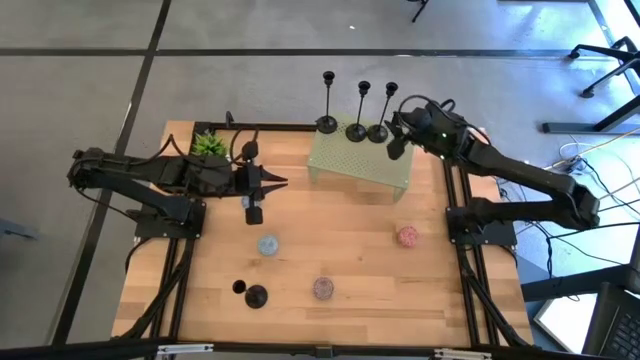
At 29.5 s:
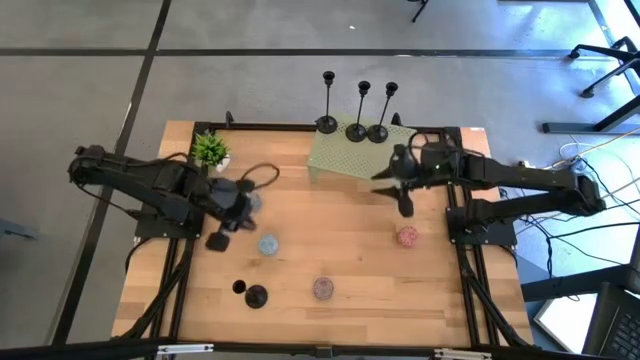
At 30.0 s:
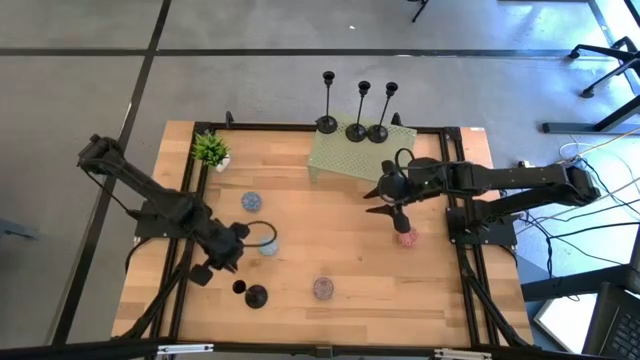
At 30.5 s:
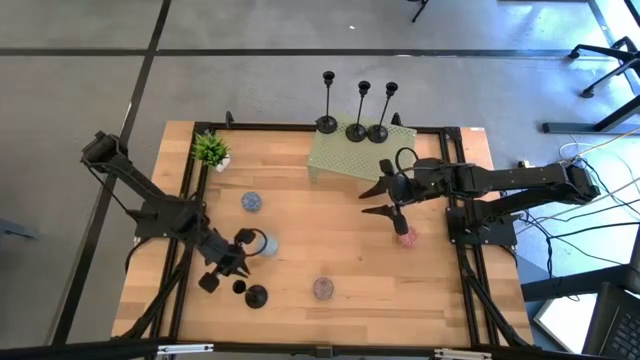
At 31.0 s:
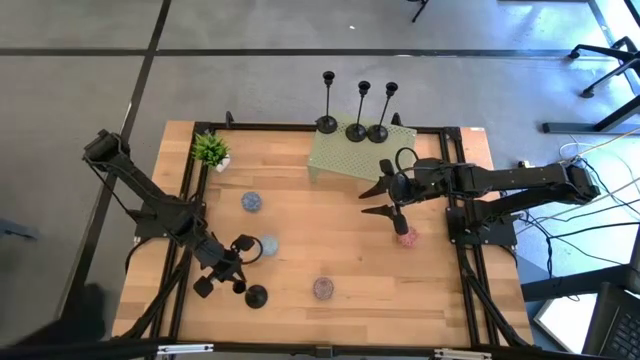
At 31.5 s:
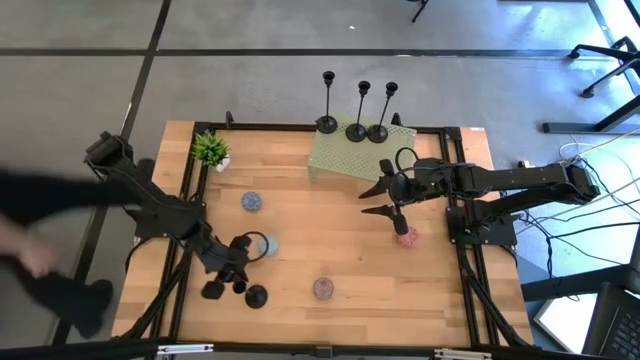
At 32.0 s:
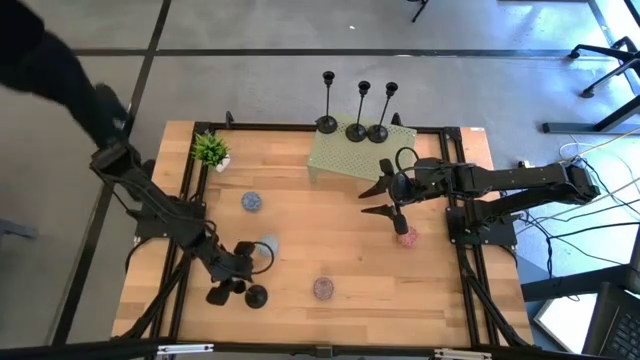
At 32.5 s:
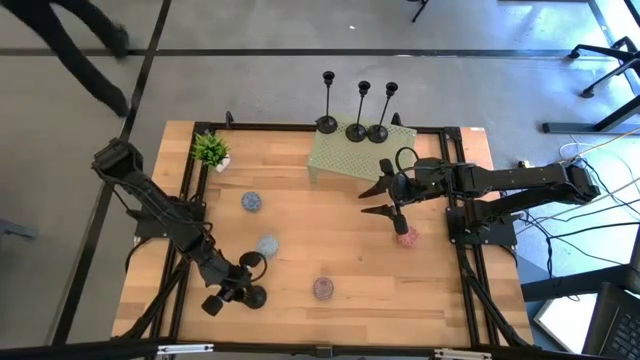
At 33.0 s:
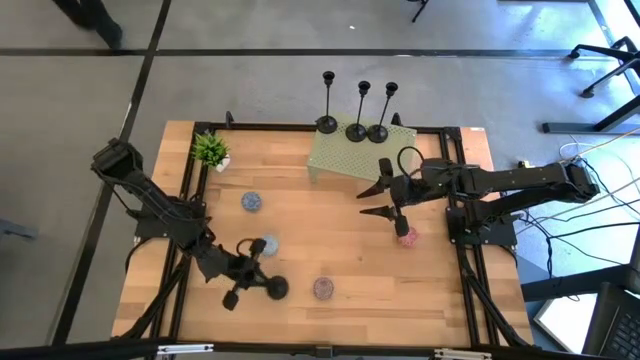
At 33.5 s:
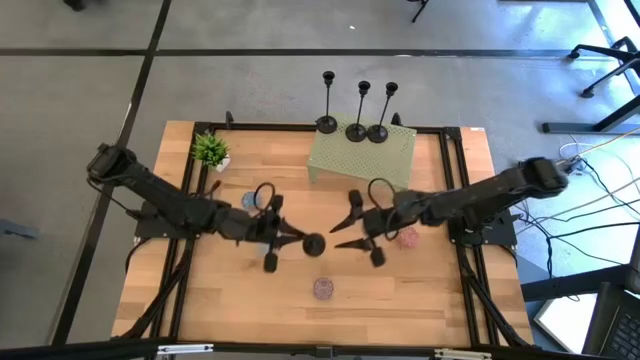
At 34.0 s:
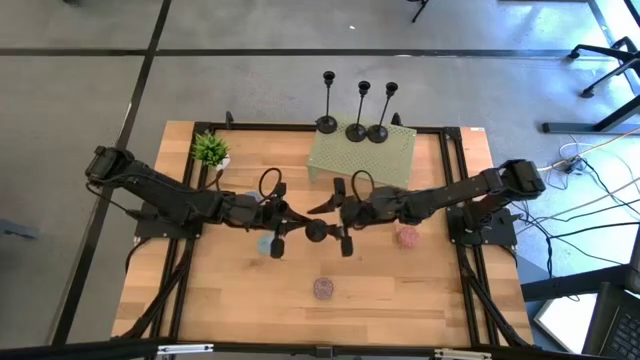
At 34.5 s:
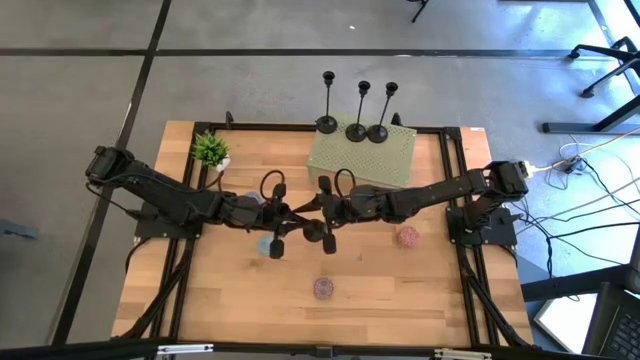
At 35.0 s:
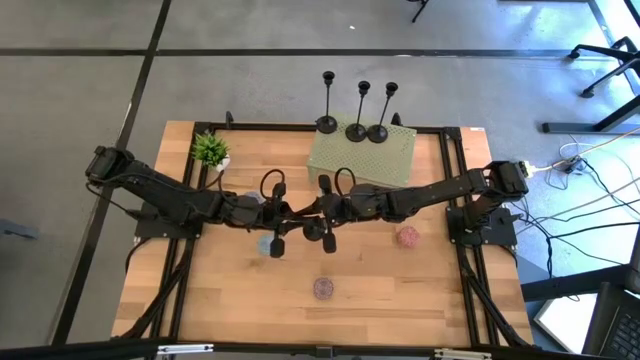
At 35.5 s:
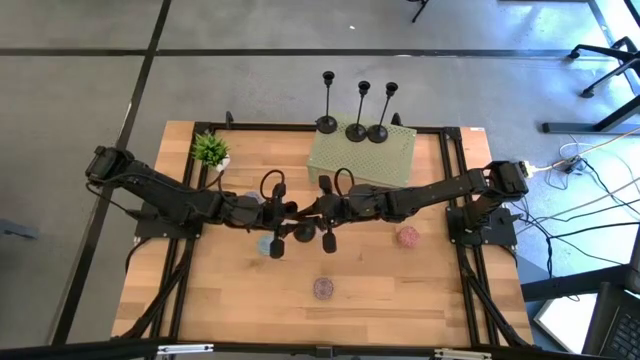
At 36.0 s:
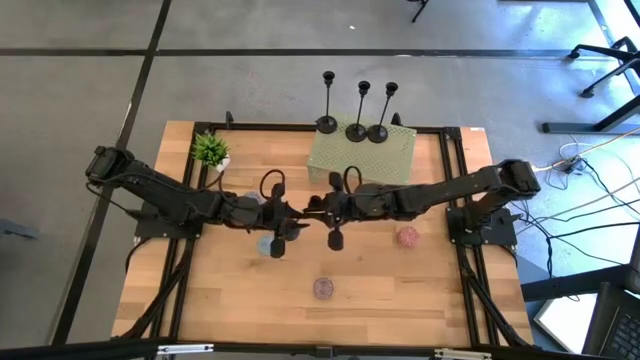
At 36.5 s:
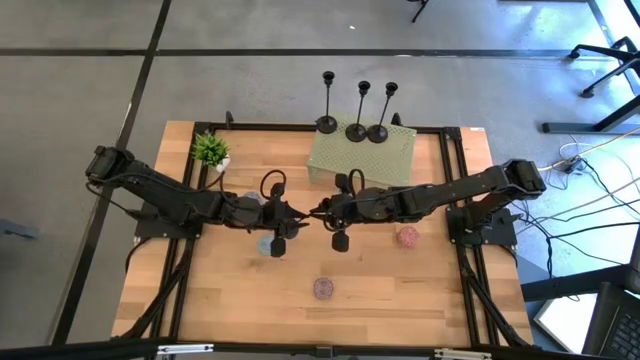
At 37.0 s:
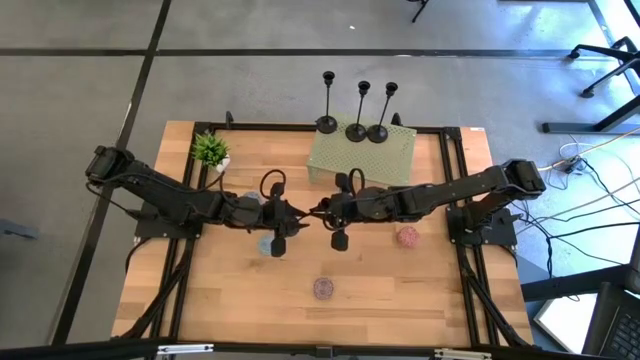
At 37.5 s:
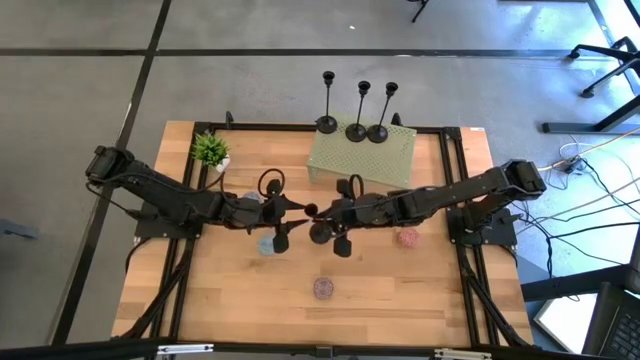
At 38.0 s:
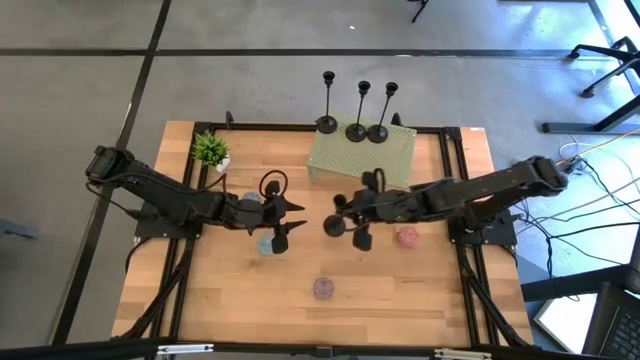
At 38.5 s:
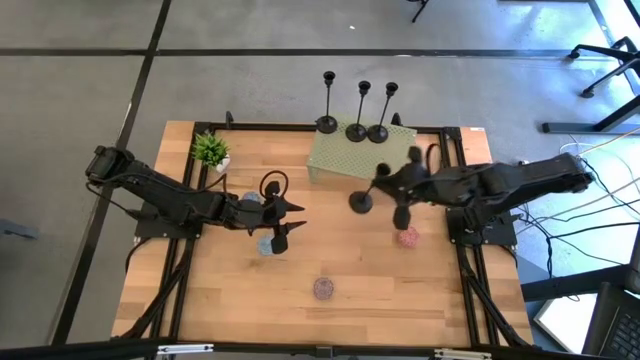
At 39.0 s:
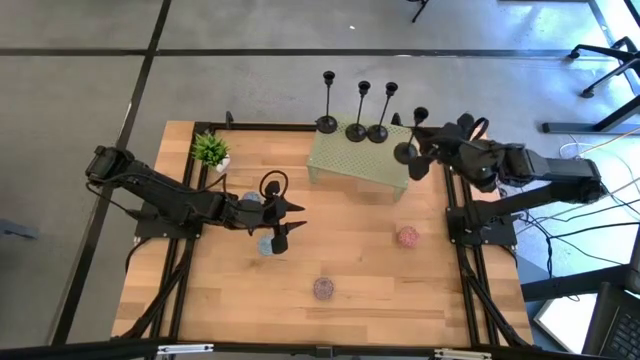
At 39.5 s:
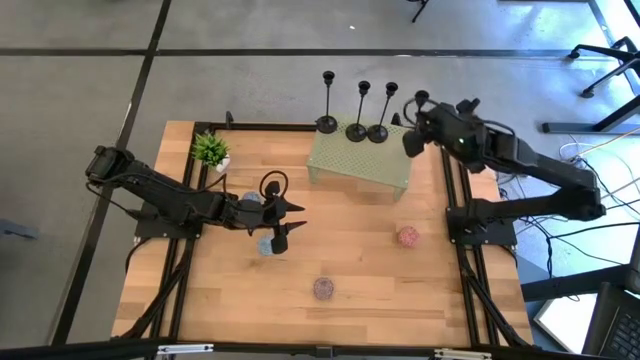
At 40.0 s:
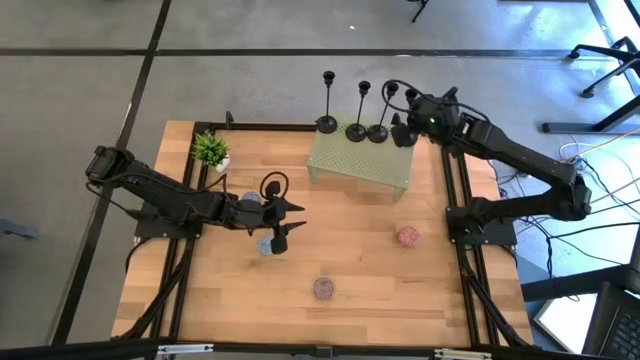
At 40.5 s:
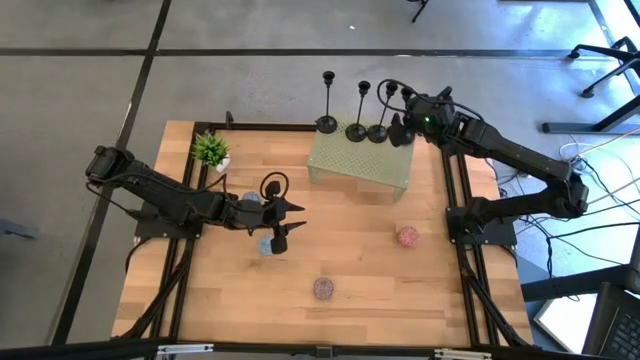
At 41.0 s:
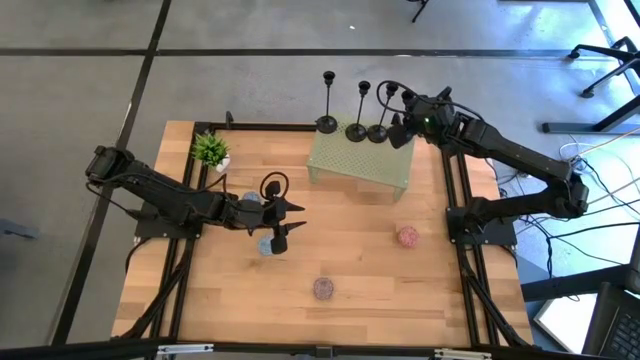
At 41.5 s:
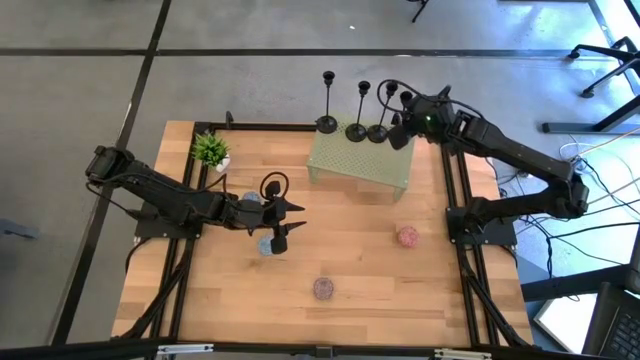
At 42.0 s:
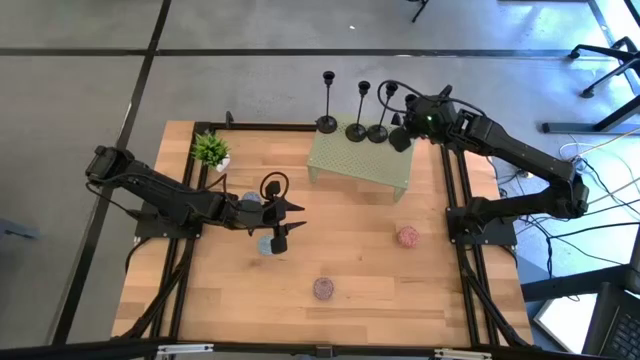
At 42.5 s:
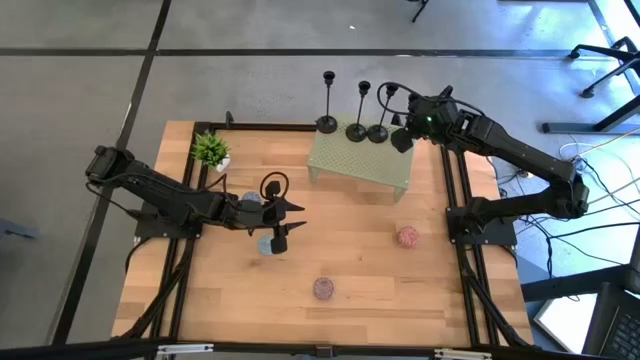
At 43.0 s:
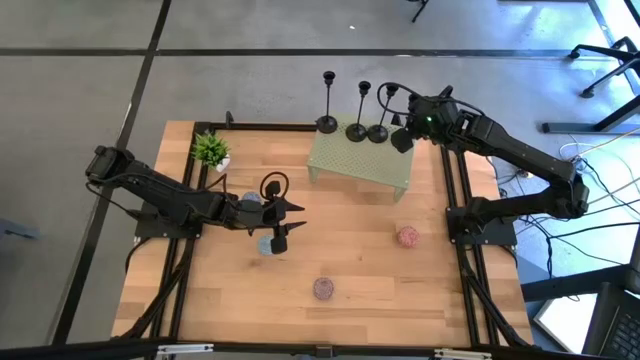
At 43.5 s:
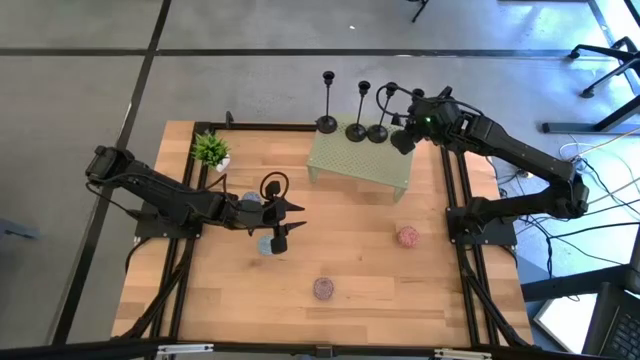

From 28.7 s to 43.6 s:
Task: Pick & Place candle stick holders
Put the black candle holder on the shelf

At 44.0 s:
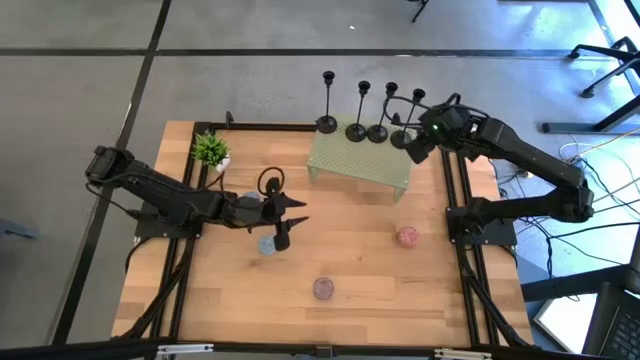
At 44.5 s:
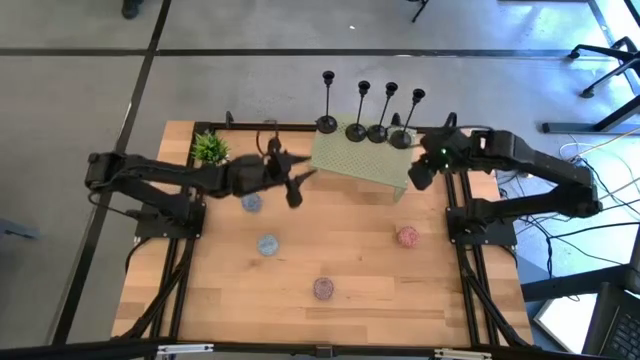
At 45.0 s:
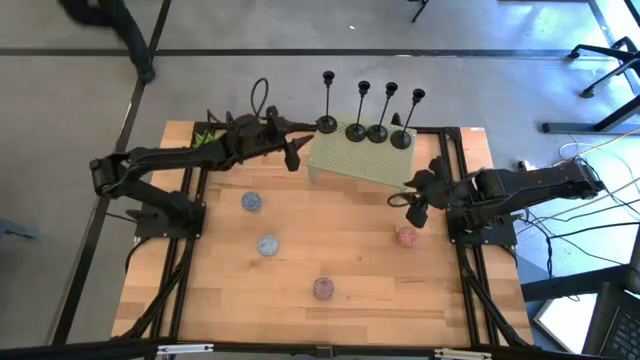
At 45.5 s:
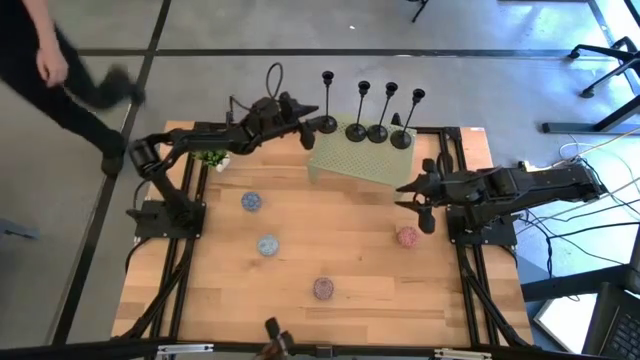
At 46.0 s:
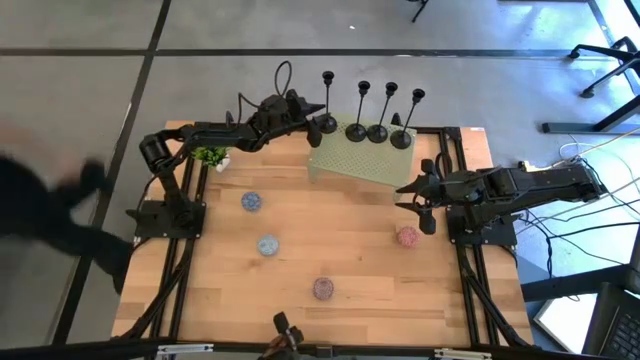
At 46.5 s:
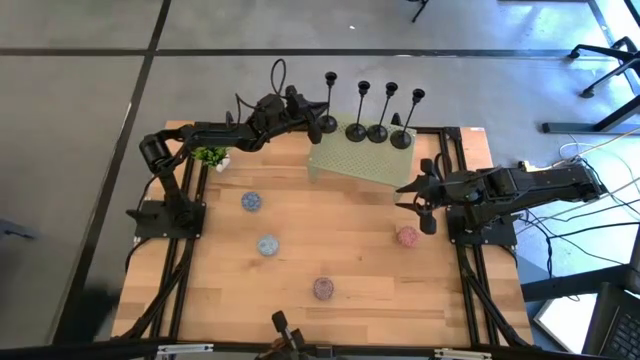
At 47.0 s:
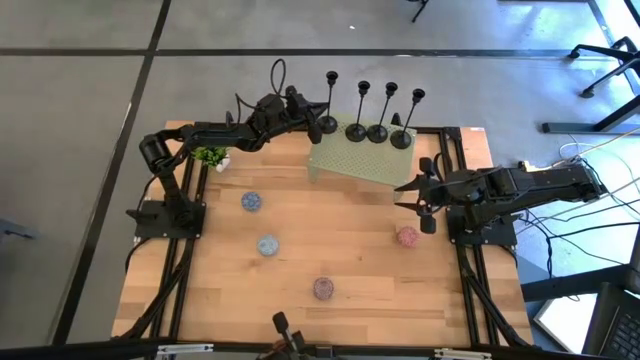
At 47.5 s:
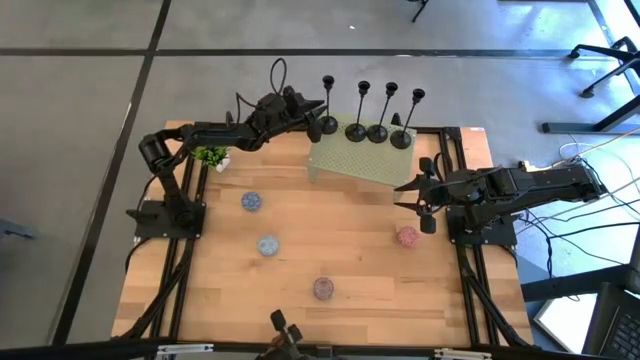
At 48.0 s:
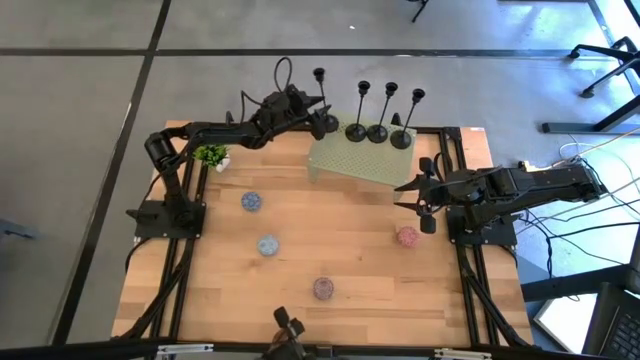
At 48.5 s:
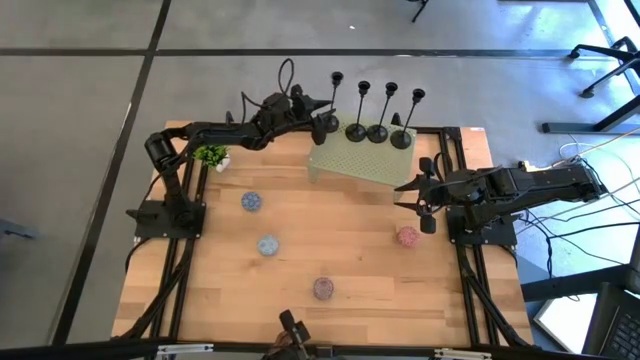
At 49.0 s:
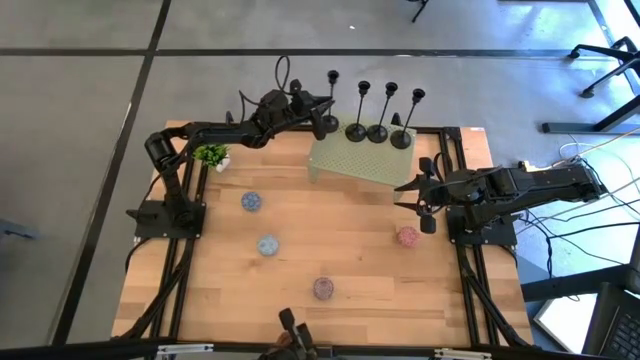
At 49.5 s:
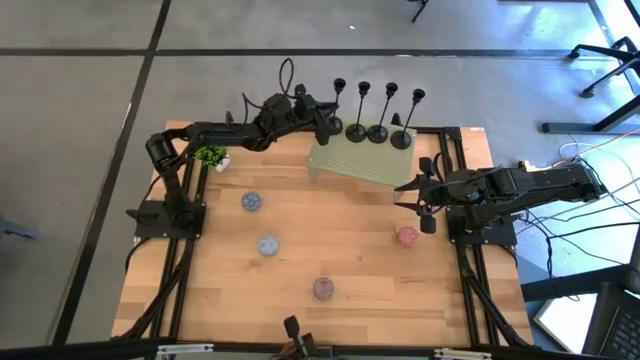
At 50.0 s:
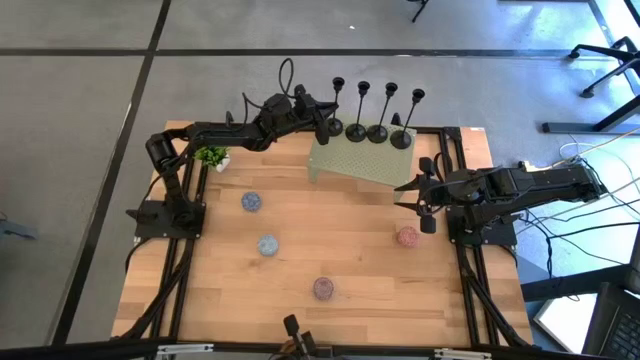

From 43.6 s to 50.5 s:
Adjust the black candle holder on the shelf
